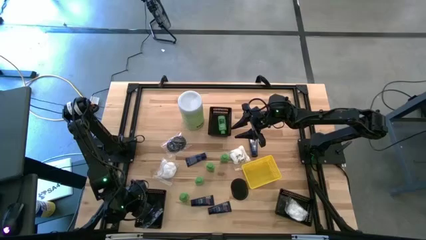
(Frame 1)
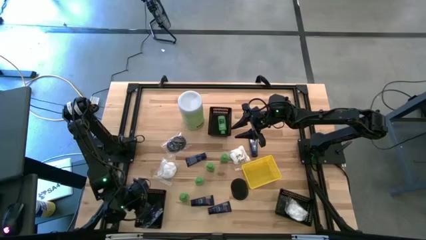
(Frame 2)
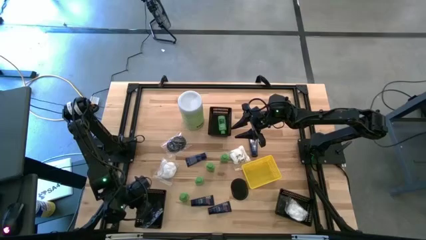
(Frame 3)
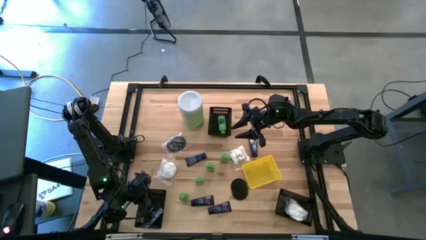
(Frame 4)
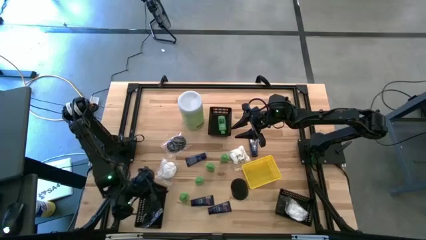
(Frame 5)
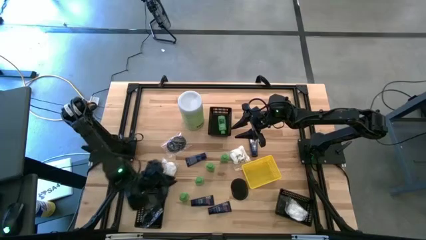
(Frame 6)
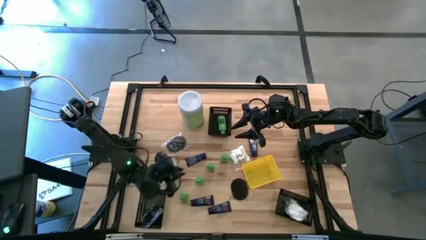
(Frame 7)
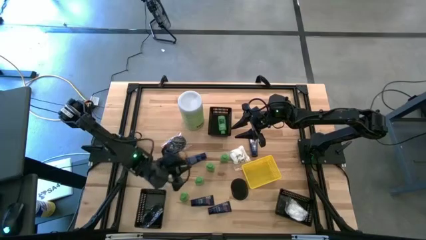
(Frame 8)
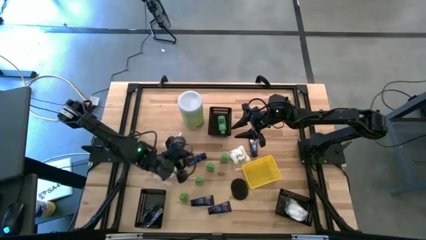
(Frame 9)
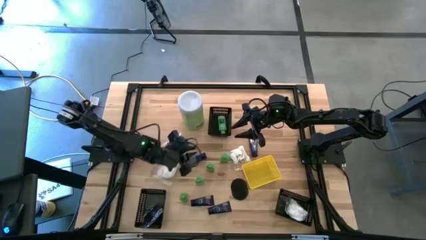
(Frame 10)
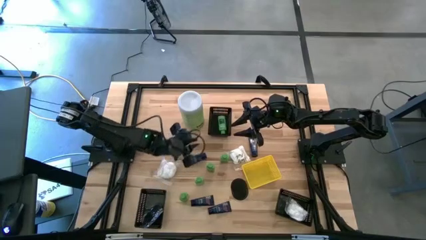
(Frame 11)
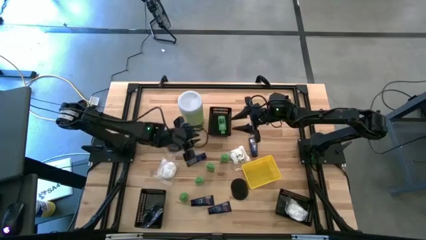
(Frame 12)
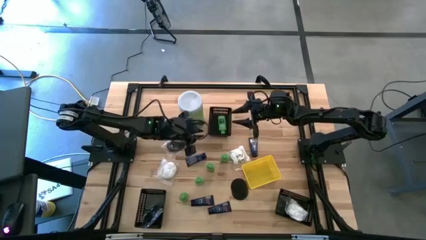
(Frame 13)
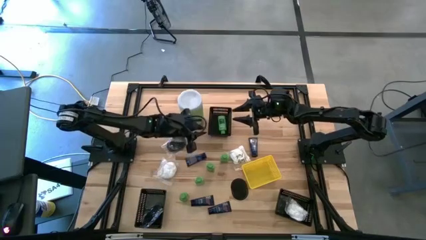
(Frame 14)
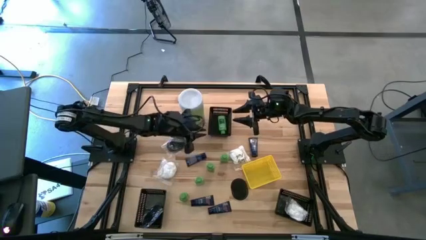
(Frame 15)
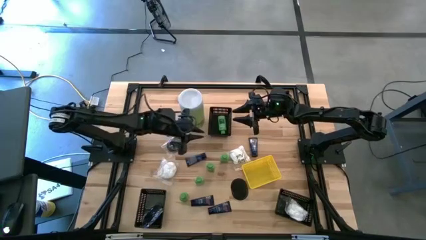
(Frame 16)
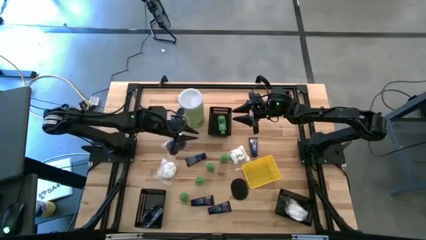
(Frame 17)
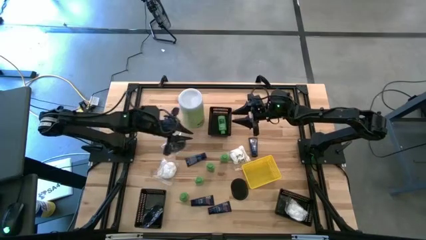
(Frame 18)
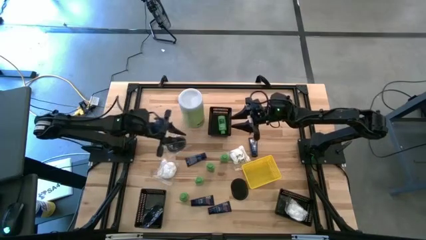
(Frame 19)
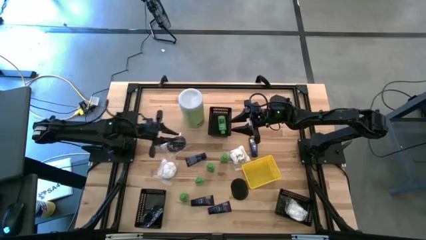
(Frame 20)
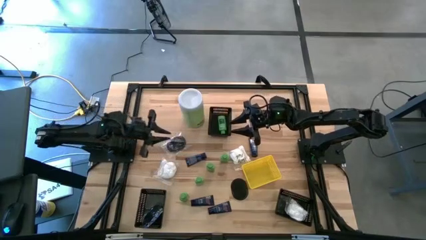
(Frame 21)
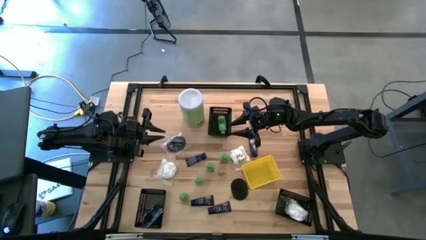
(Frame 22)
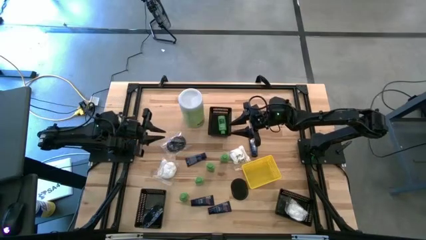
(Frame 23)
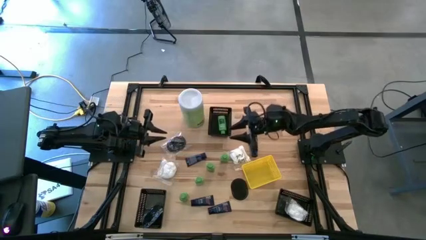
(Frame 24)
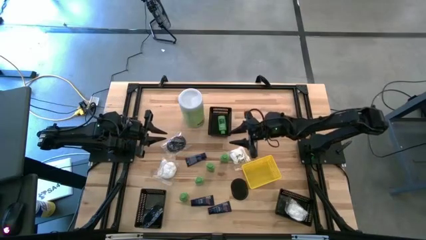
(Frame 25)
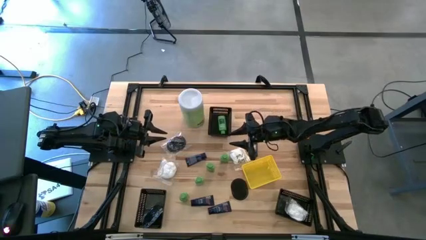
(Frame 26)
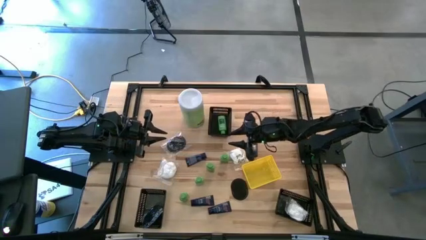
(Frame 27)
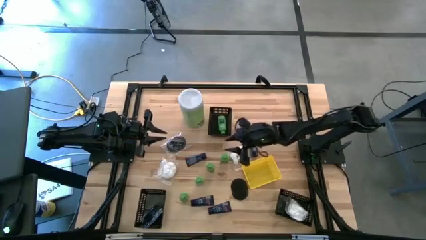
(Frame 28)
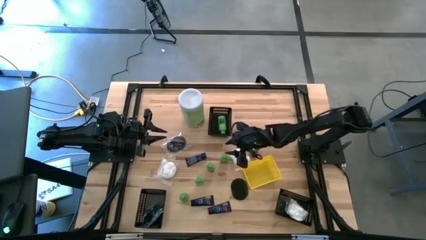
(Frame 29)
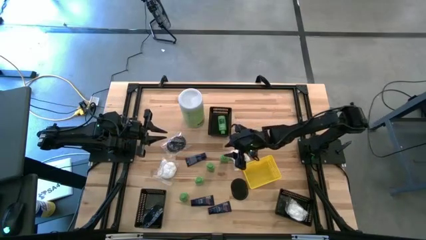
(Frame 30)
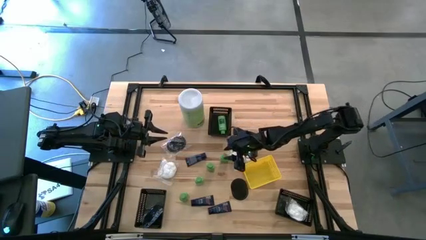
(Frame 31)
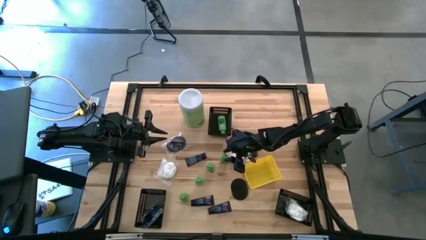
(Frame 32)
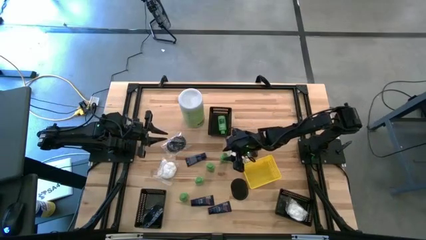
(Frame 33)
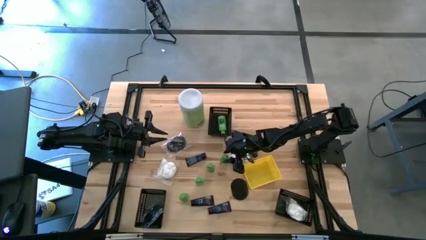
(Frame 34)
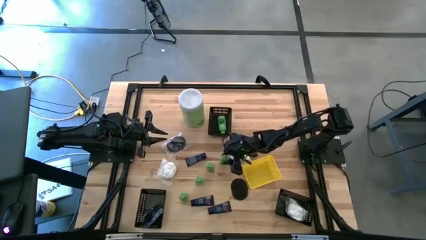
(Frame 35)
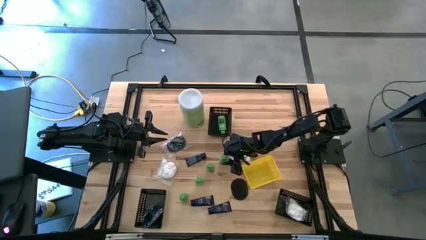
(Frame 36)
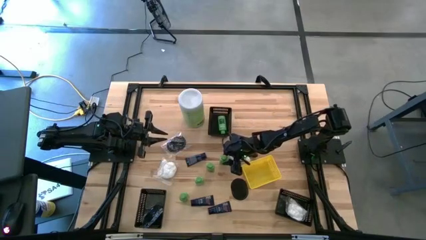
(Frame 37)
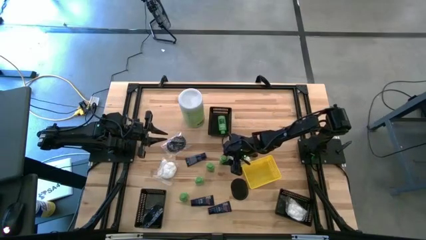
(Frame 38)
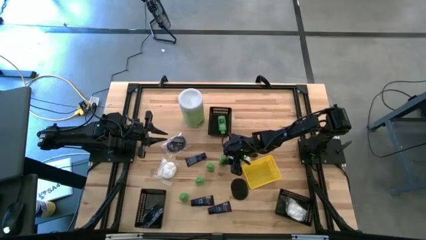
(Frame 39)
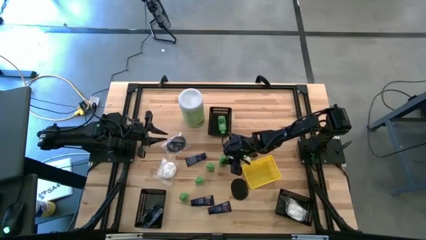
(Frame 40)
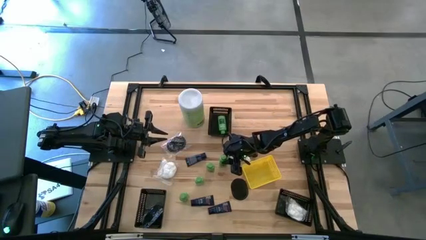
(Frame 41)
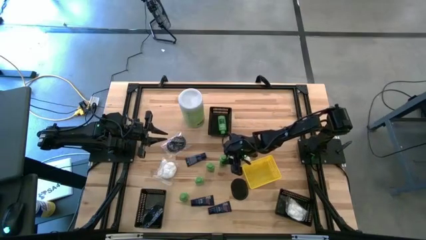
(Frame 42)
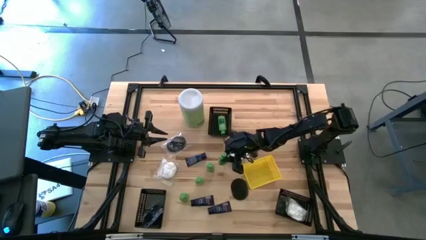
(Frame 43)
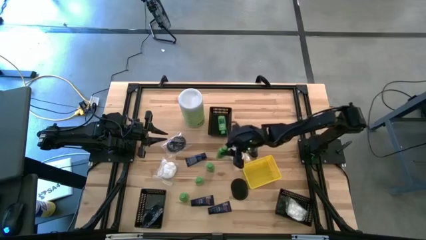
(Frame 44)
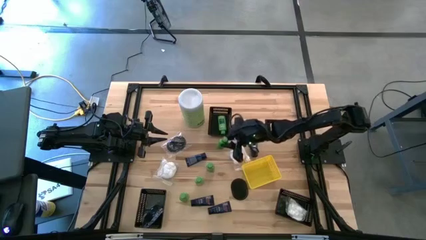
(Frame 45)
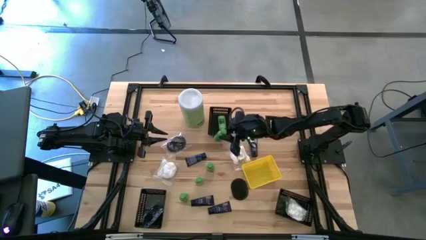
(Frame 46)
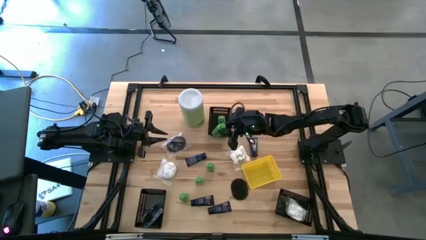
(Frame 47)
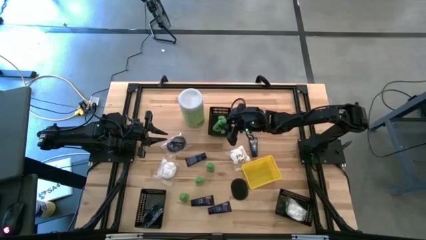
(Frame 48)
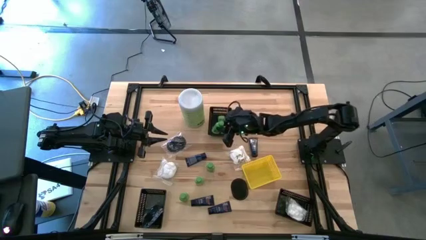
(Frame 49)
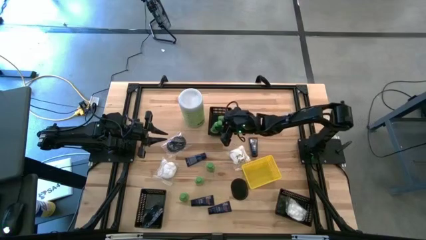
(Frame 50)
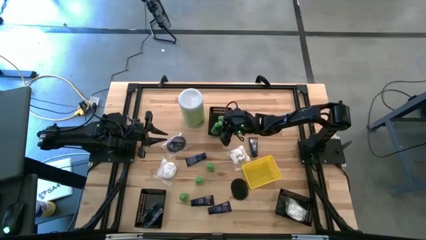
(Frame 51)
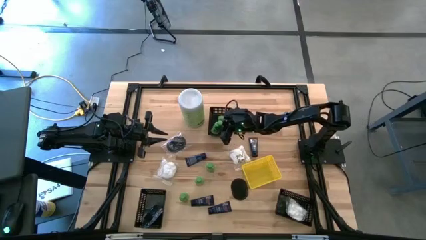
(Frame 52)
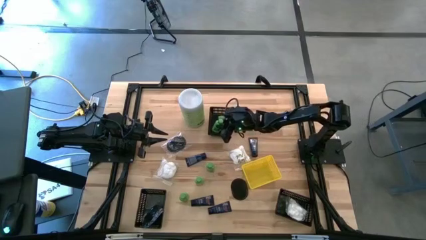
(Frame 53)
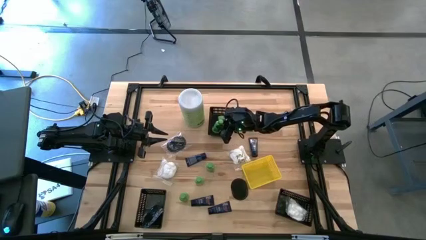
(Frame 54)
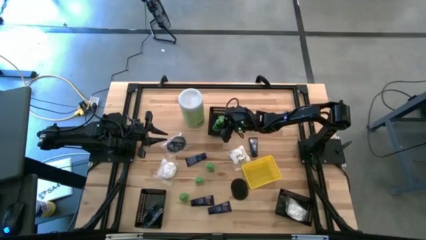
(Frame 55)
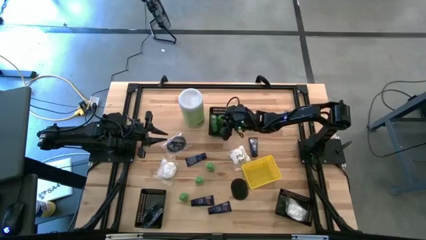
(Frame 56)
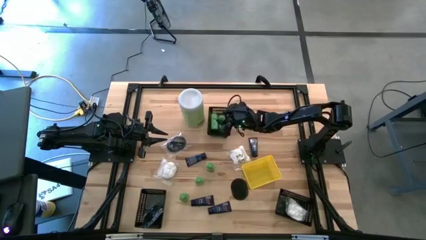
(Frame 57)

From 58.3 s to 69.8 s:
Task: Pick & Place Travel size toiletries
Put the green shampoo bottle into the top black bin
